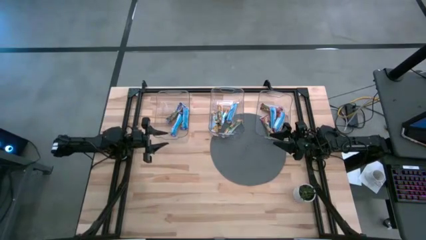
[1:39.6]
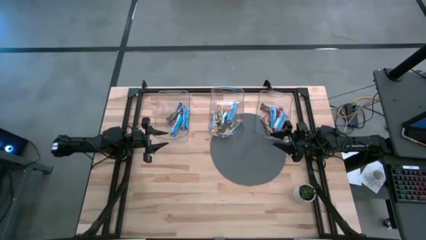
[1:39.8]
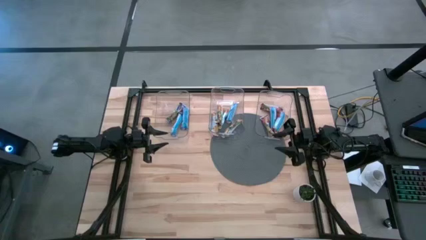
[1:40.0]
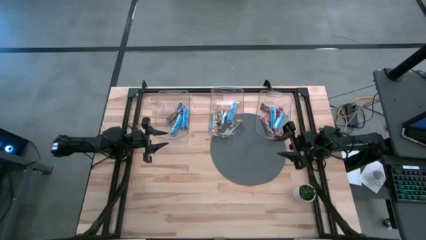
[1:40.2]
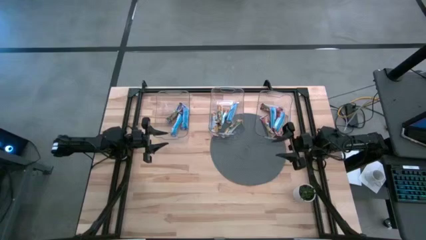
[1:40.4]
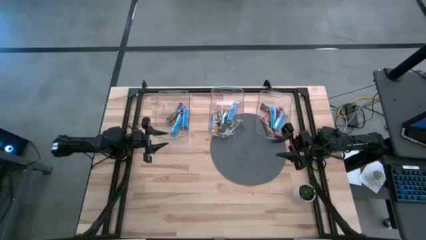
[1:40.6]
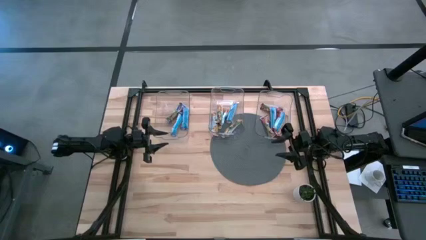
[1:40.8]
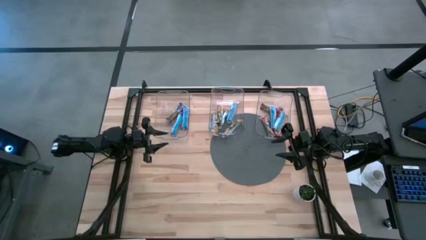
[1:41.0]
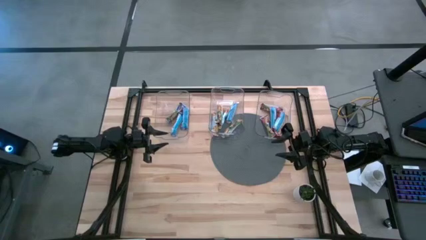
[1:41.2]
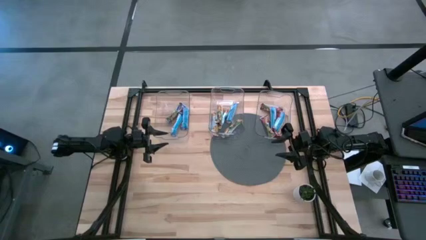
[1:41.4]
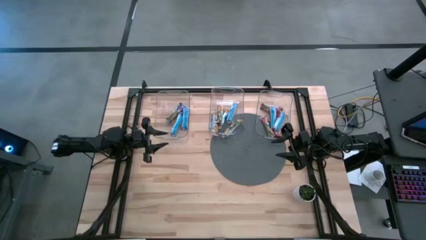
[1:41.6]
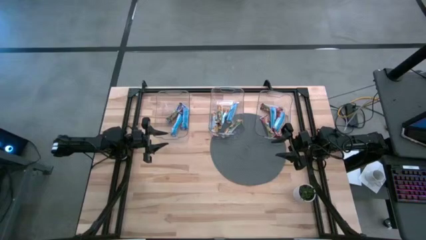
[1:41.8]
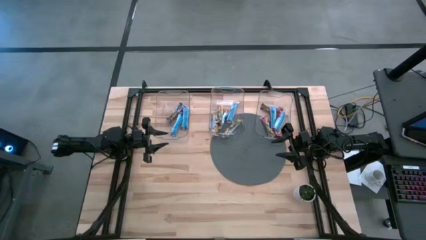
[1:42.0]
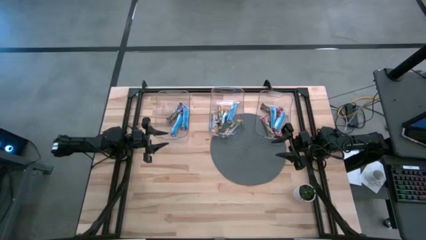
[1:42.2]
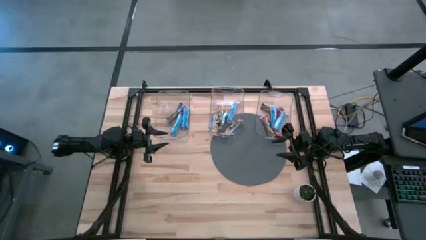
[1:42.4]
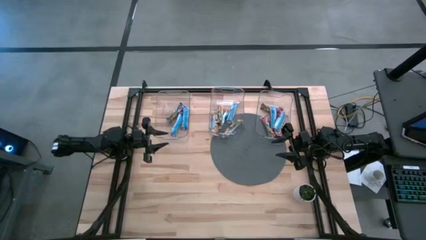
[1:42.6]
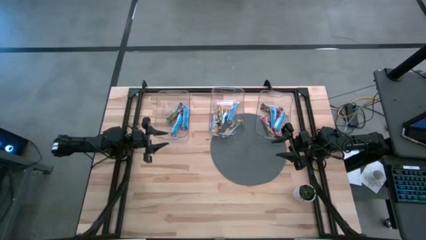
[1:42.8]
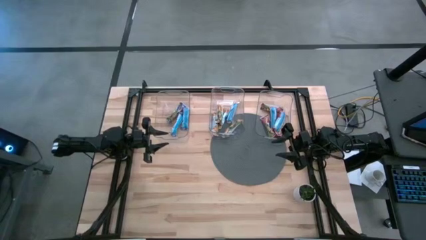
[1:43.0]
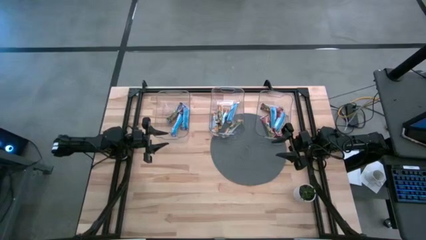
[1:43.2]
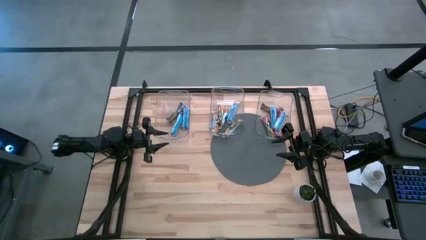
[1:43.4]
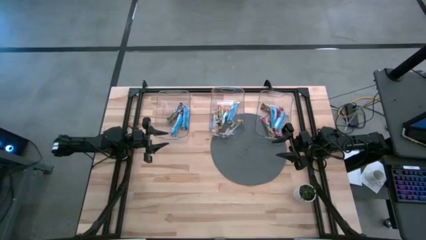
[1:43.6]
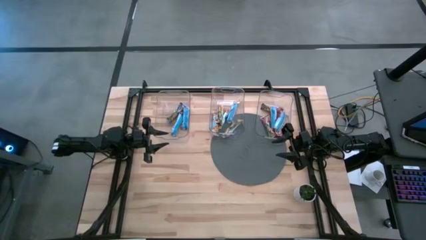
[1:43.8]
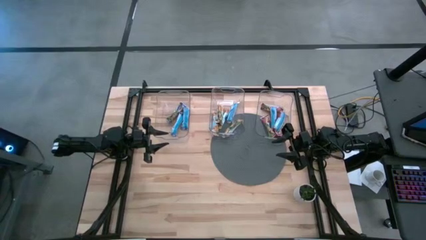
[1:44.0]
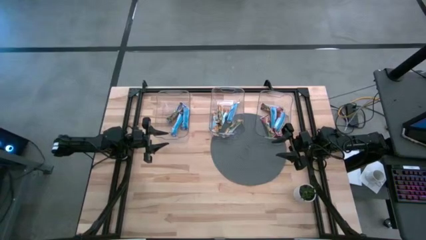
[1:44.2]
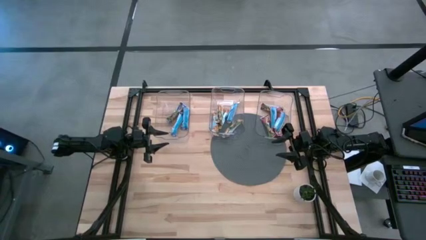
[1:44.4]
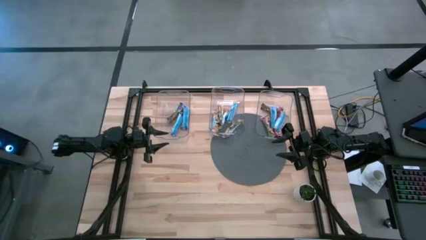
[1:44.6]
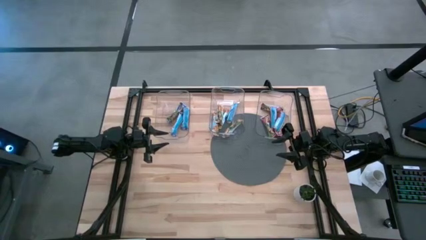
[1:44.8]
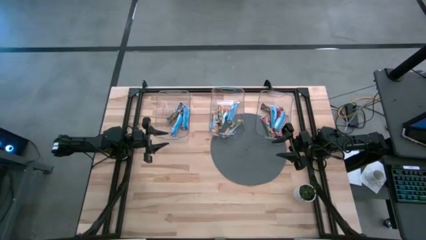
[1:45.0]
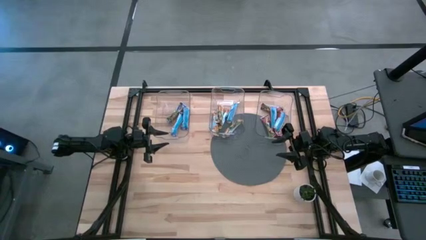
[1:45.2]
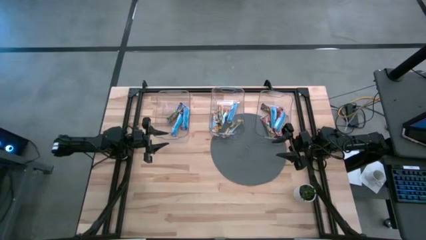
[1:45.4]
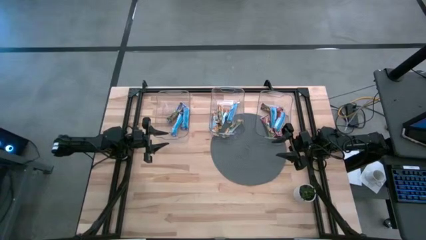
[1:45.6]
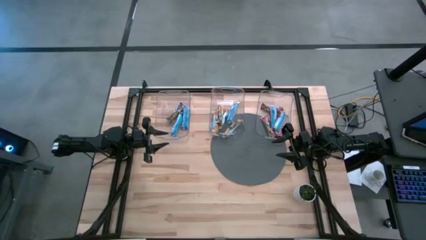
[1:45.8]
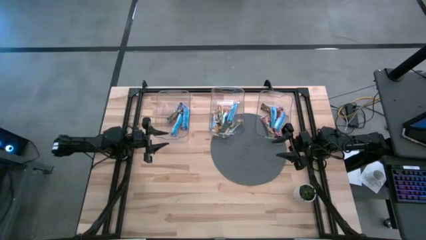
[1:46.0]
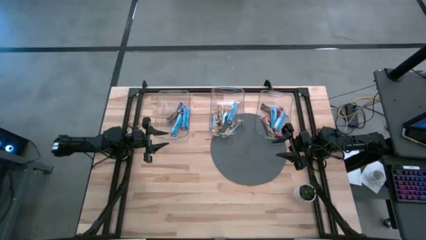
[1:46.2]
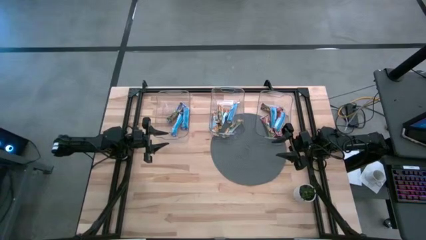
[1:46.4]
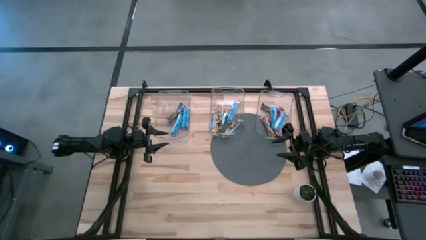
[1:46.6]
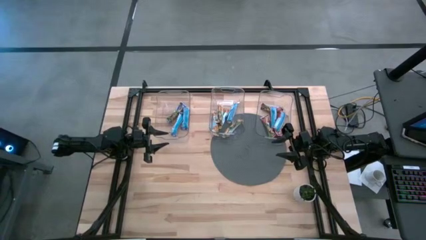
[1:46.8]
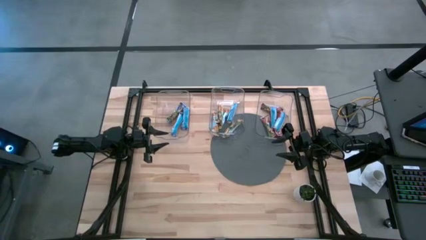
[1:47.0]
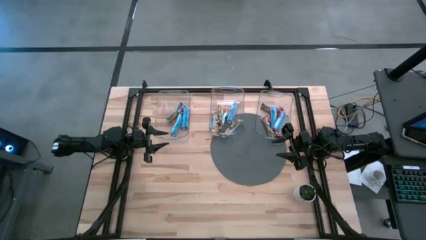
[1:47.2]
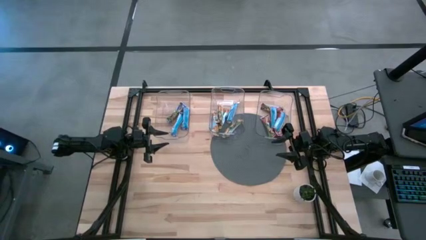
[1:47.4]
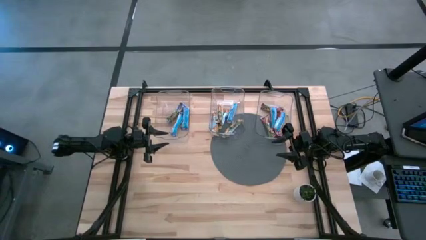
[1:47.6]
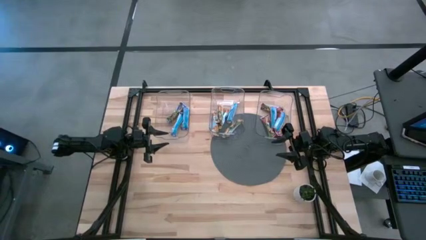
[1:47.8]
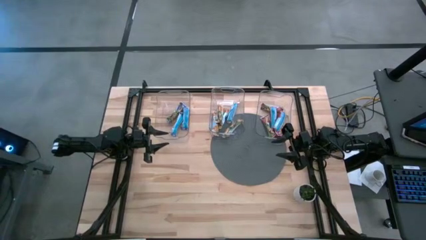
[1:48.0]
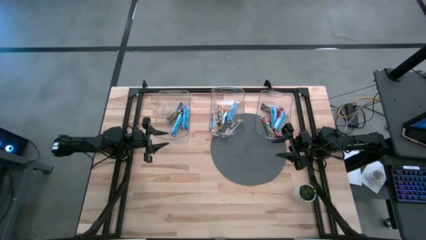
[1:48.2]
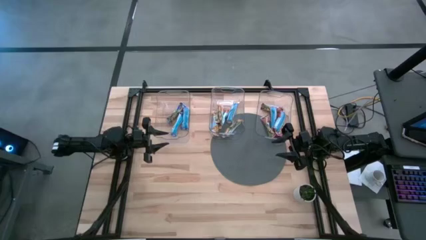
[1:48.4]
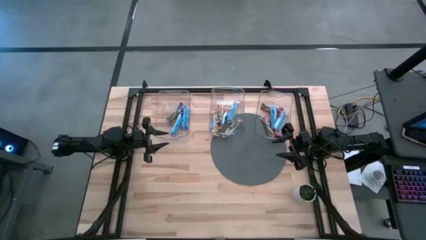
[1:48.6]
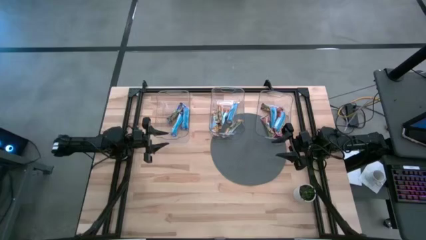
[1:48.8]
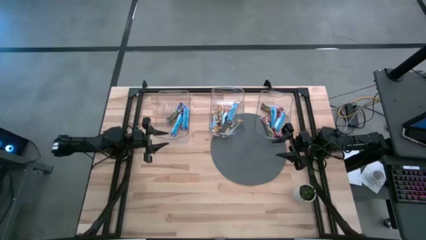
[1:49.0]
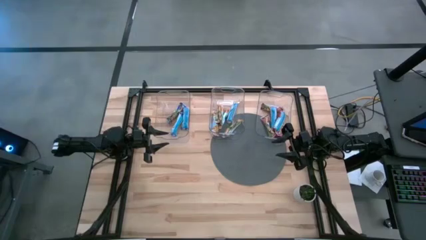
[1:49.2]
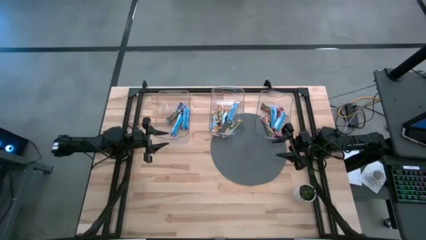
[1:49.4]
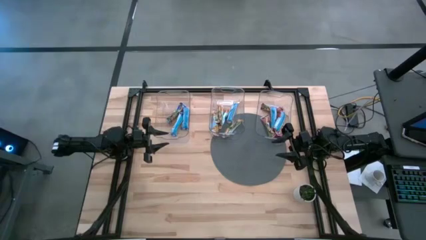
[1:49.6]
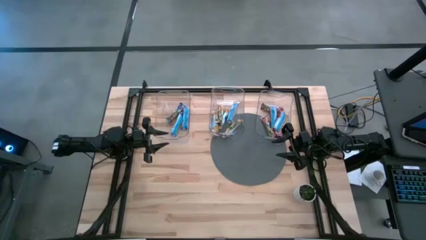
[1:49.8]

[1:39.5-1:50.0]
Task: Pick and place Granola Bars by type
Return to Home Position

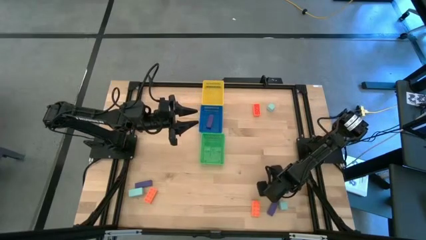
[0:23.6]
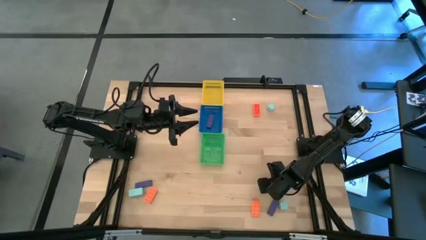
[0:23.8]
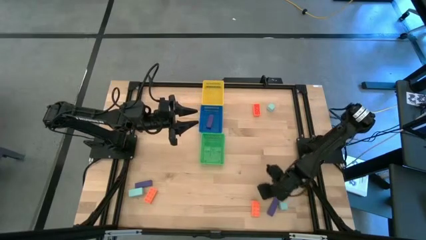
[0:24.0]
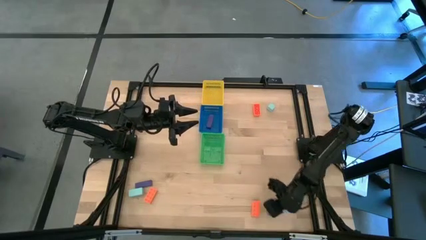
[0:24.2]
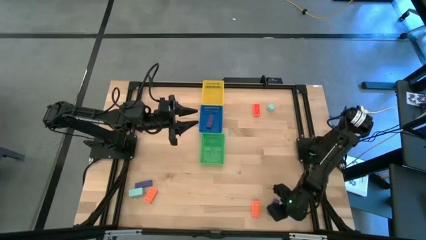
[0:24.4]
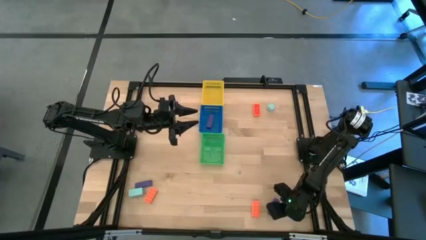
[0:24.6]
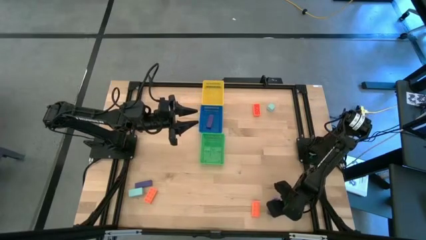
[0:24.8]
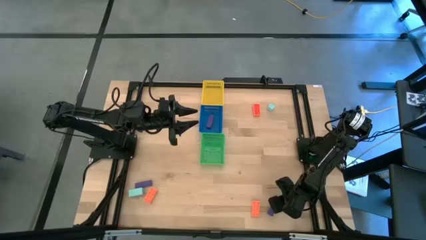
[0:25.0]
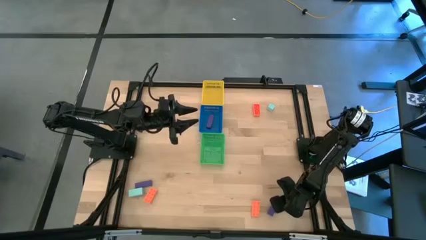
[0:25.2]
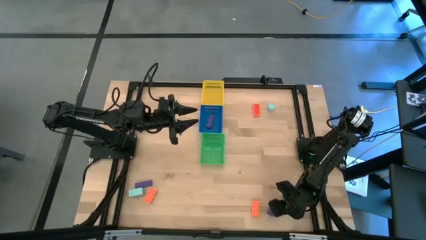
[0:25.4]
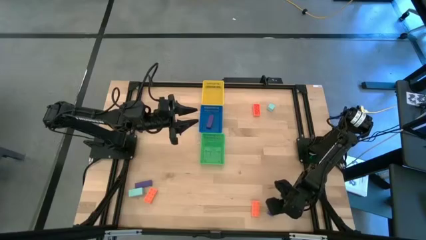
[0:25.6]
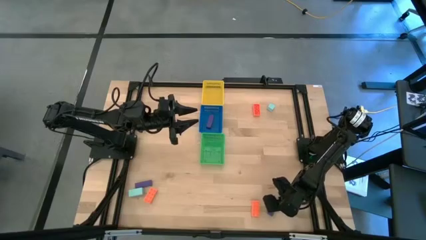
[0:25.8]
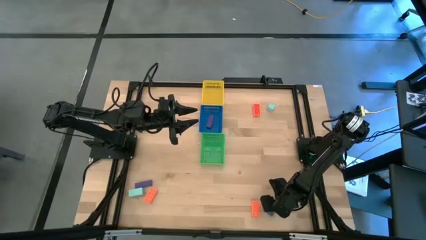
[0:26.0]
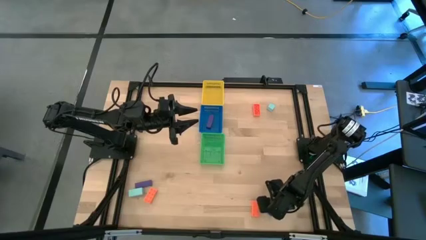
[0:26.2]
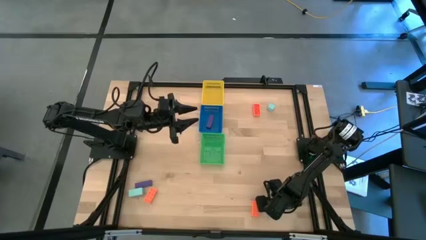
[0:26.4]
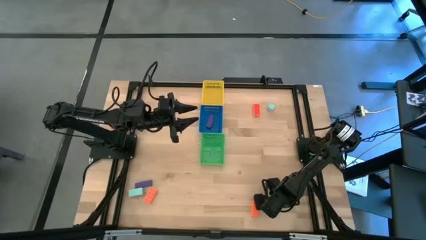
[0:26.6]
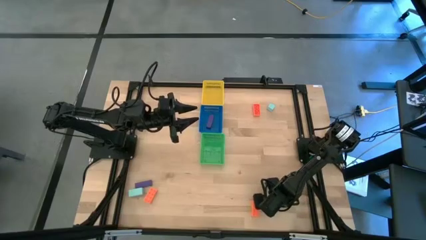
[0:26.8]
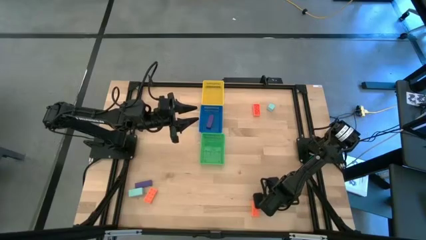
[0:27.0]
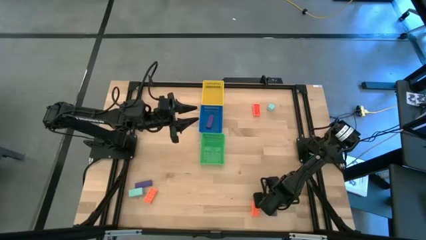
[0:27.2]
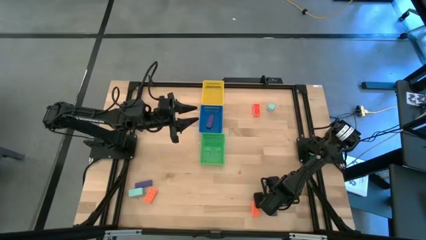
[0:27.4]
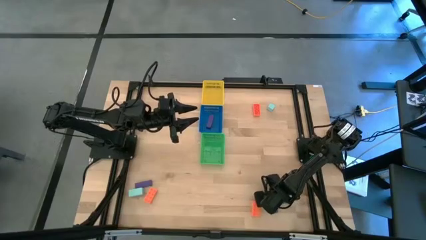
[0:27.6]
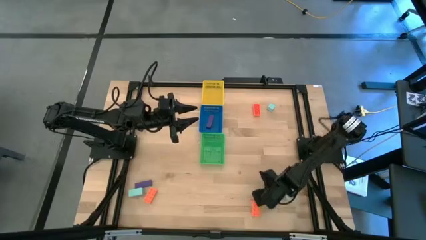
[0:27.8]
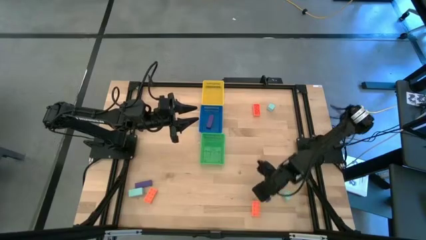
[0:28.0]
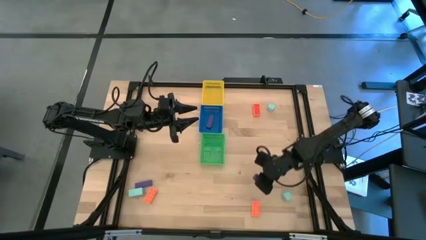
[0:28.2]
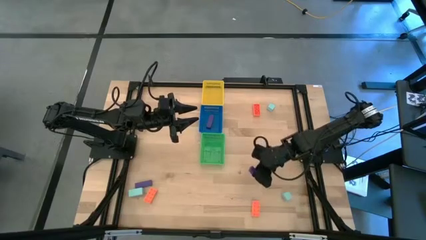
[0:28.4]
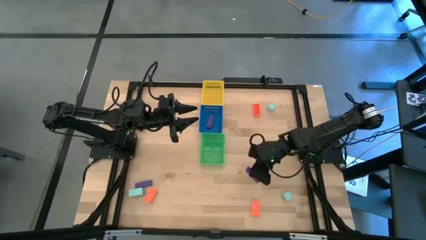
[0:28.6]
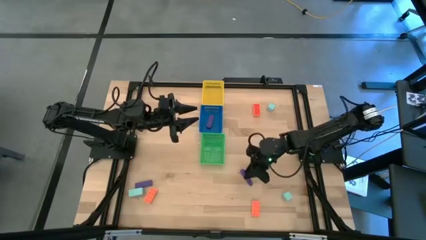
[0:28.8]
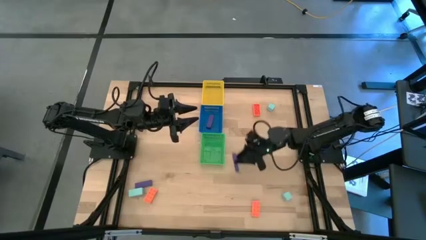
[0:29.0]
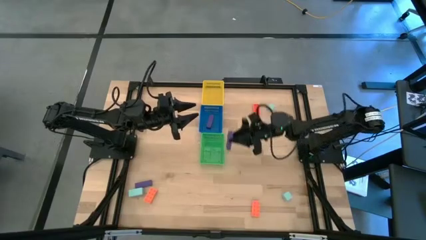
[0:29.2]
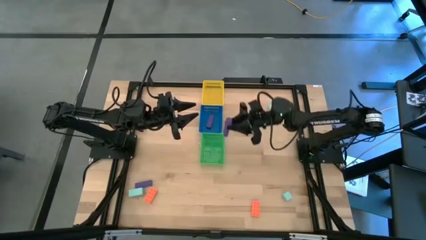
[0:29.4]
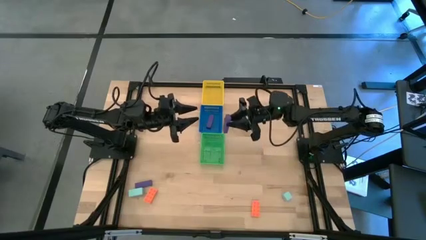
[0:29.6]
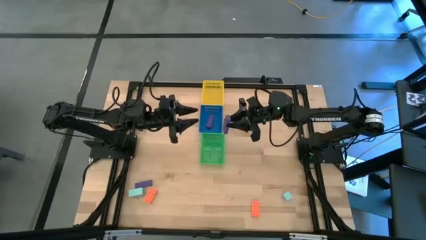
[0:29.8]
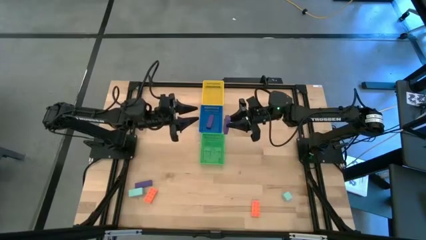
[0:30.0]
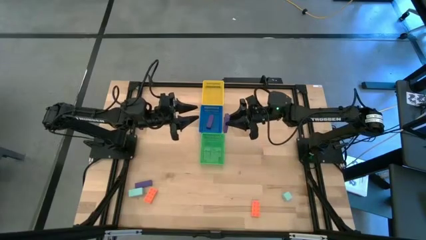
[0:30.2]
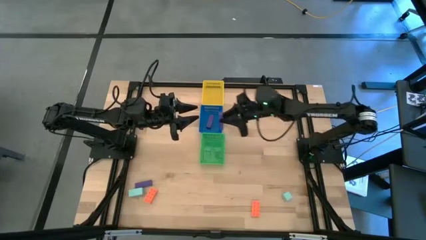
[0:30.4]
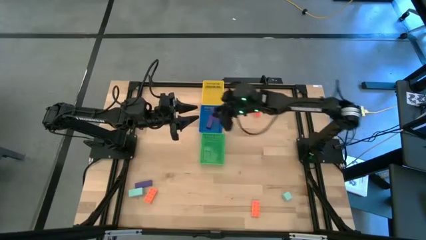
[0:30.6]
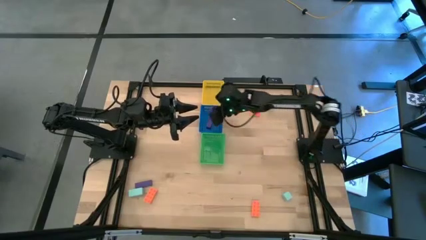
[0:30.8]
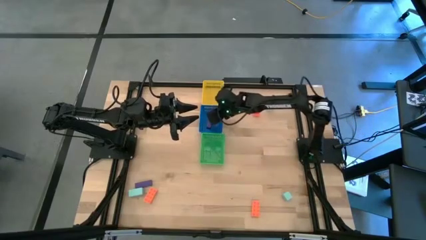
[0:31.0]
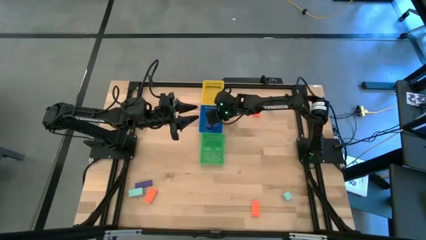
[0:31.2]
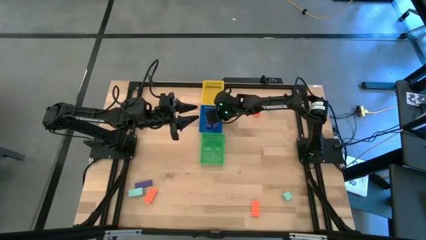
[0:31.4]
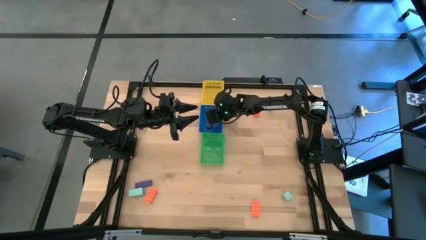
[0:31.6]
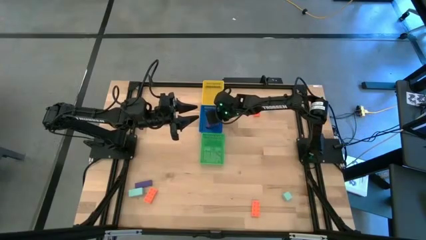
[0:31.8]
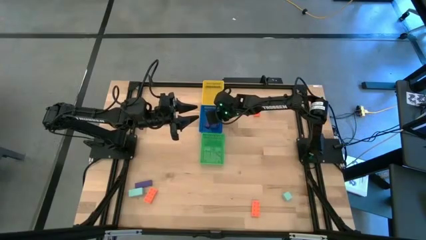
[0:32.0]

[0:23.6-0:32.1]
Task: Sort & place blocks by color
Put the right violet block into the blue basket
